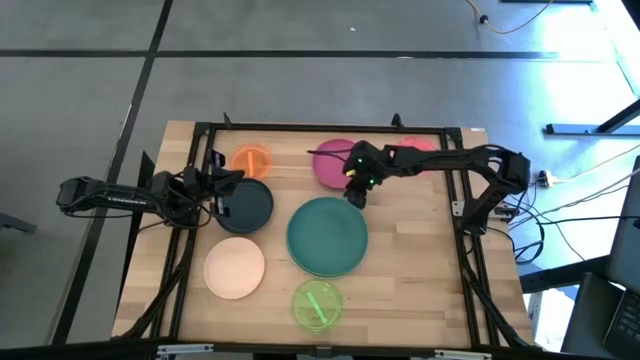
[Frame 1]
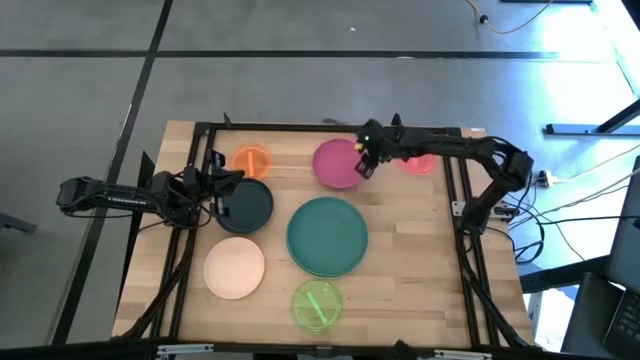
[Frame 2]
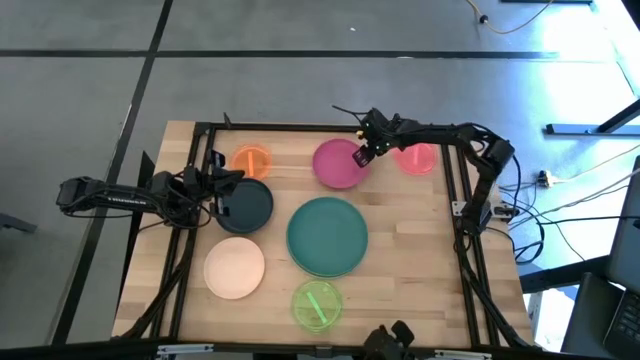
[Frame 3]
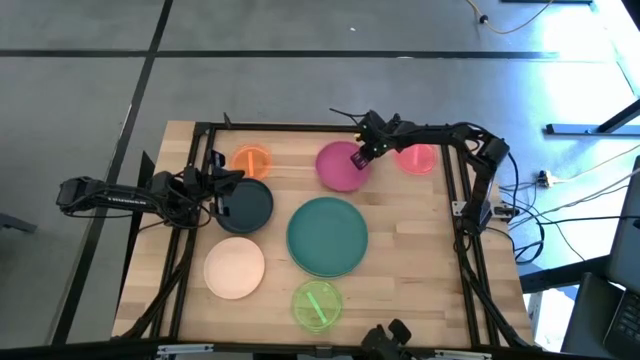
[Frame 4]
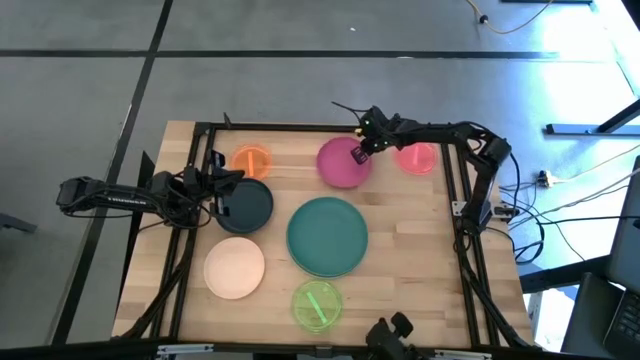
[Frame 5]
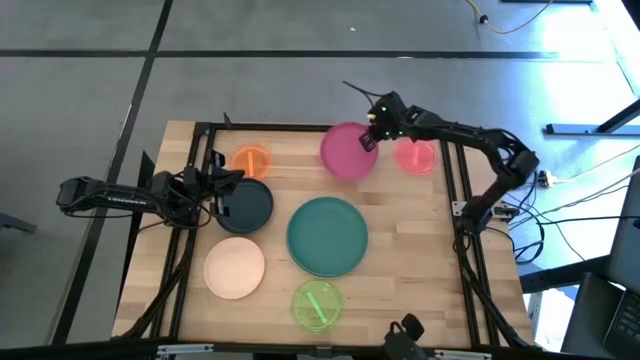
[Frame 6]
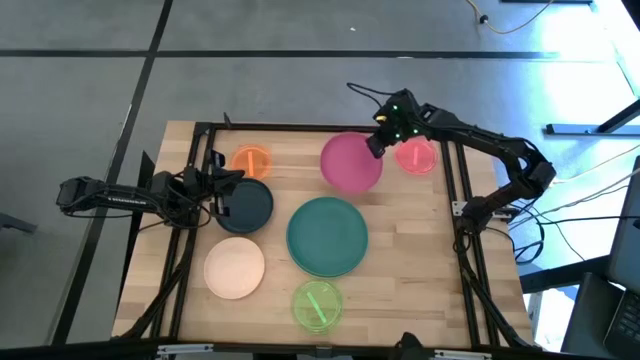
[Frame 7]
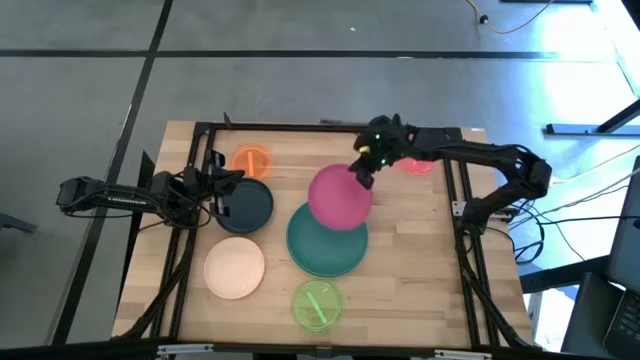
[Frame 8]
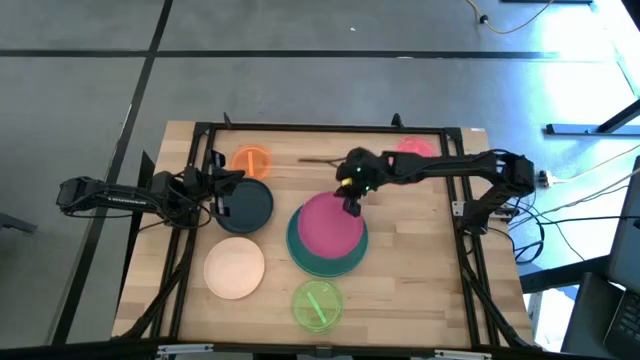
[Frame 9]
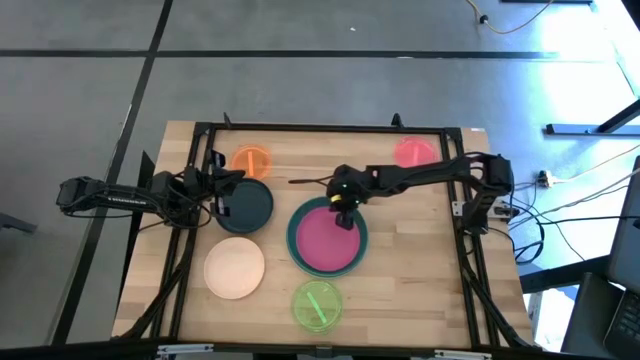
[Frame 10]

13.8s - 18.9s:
Task: Stack plastic plates
Stack the pink plate on the dark green plate

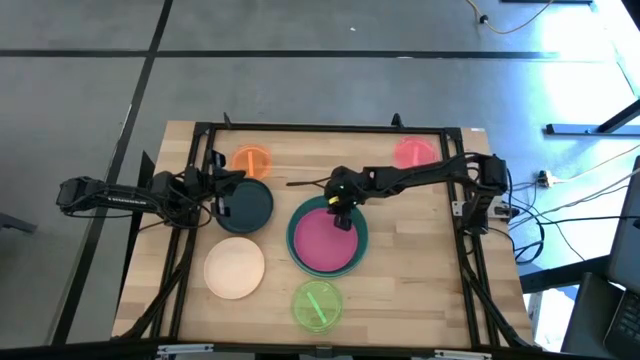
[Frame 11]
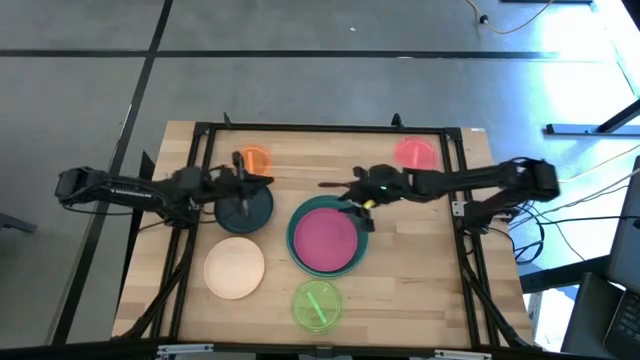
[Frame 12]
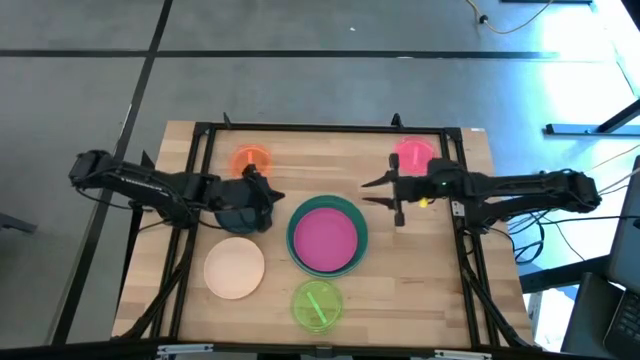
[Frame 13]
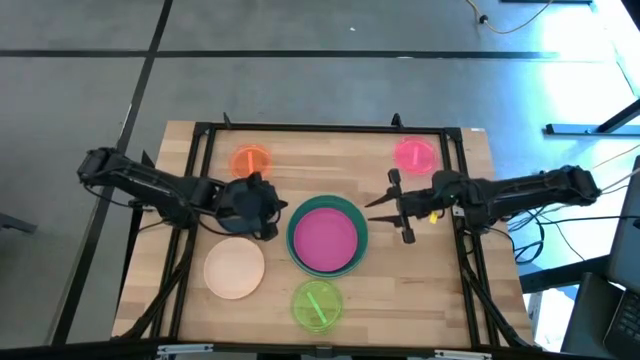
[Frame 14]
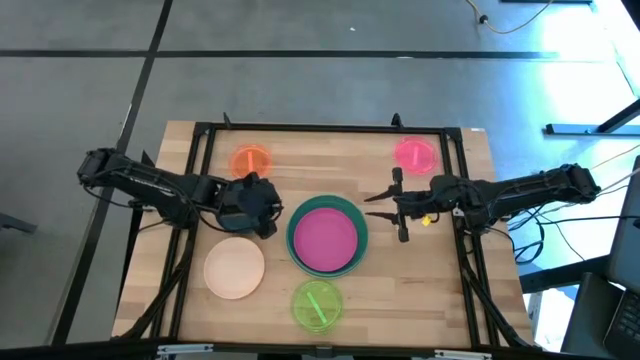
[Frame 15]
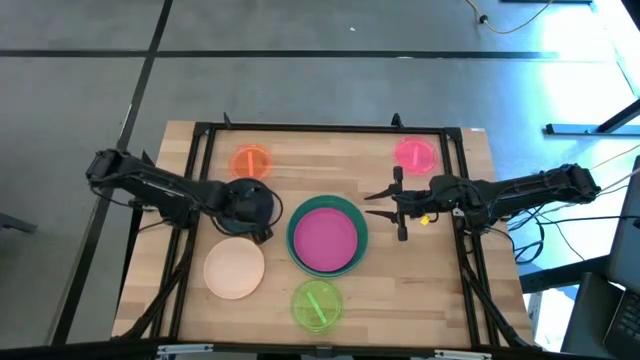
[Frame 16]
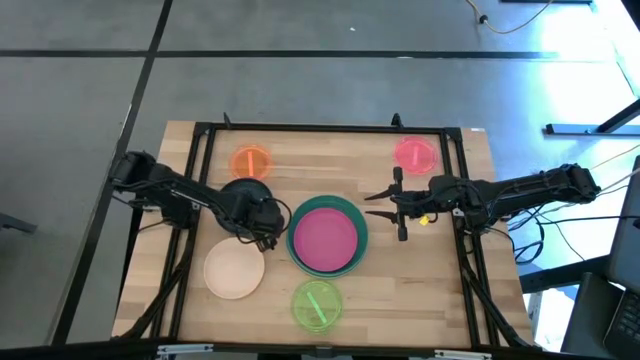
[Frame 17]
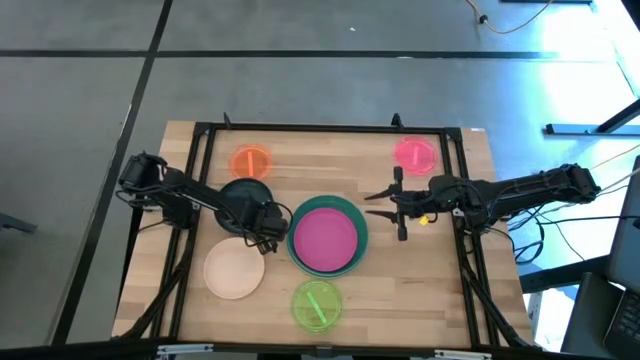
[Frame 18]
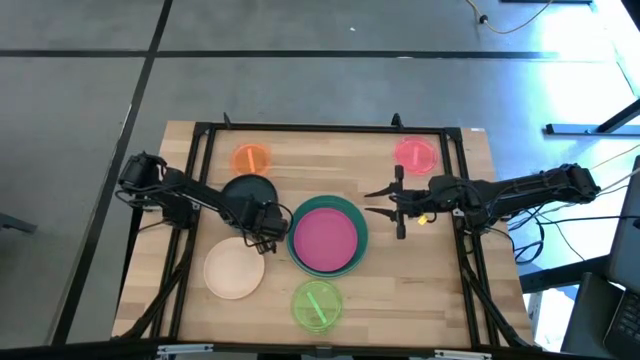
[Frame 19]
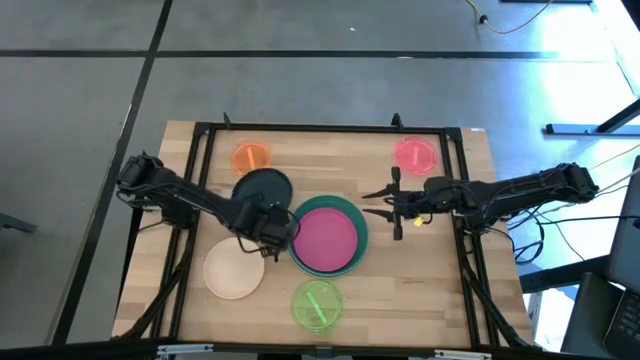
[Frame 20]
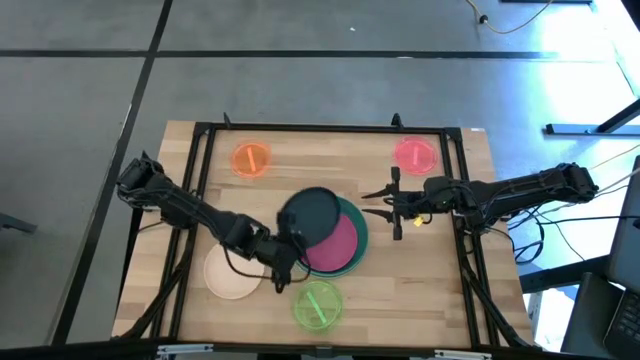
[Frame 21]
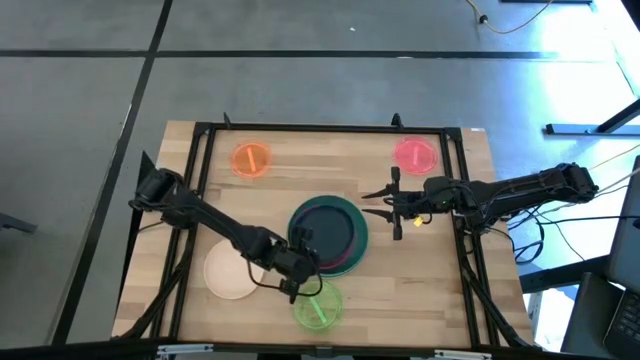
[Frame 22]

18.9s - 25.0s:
Stack the dark blue plate on the pink plate

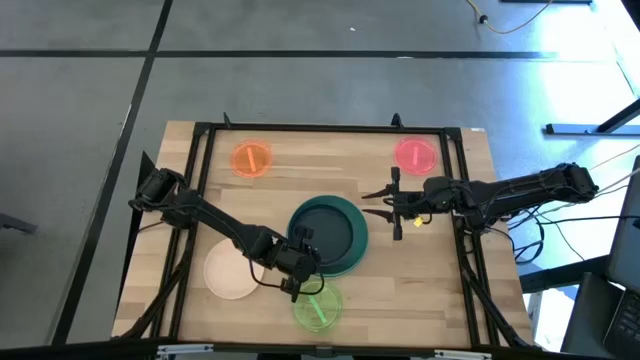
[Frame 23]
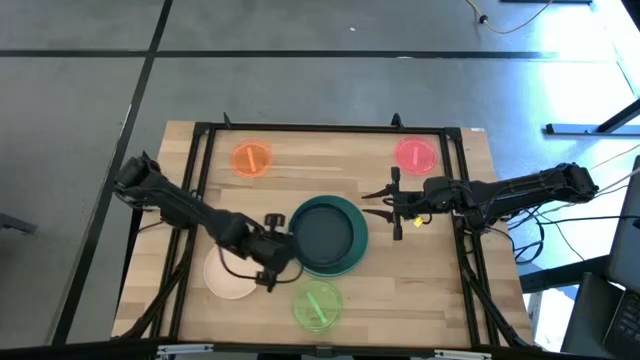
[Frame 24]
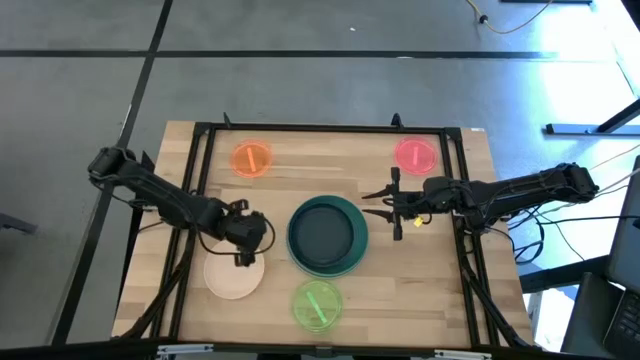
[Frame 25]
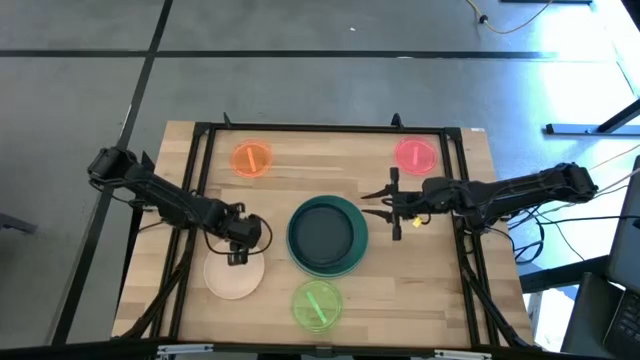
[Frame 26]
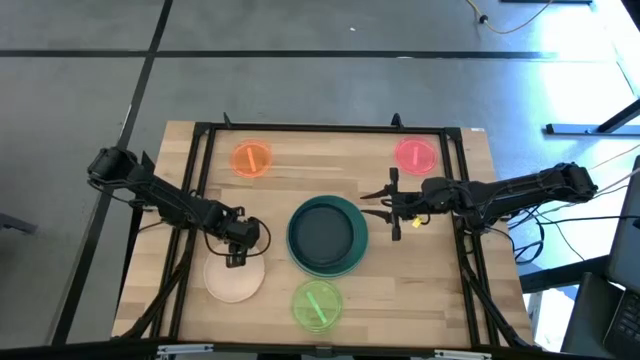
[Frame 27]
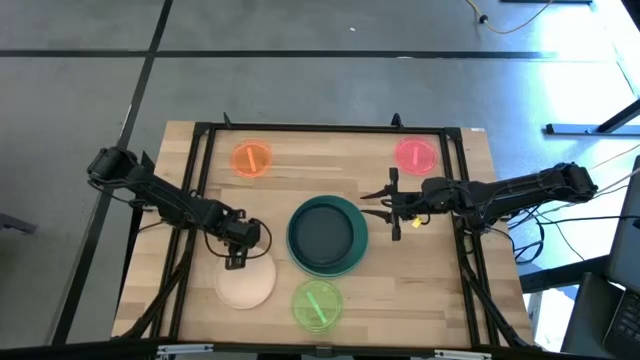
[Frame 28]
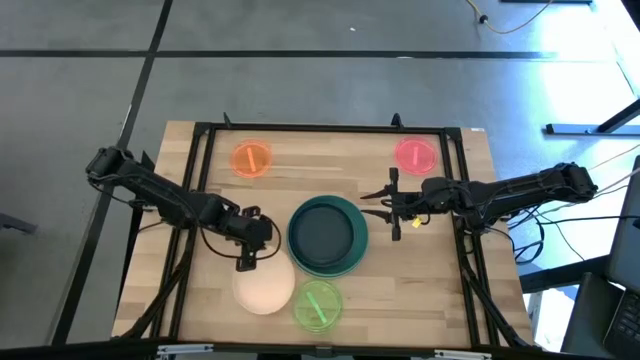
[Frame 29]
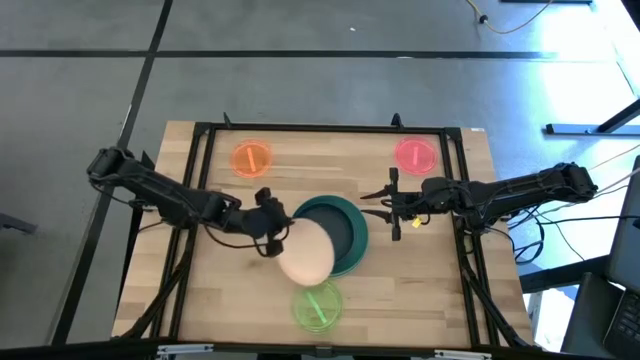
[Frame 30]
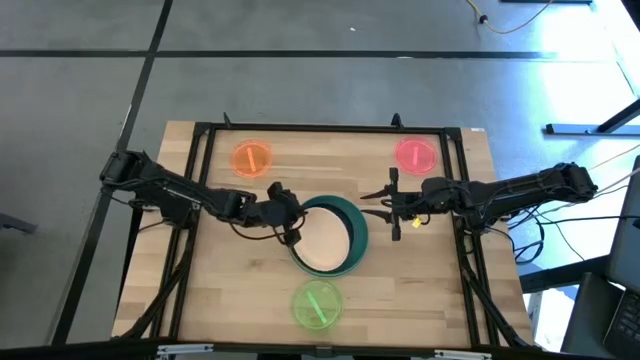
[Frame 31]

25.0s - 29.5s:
Stack the pink plate on the dark blue plate

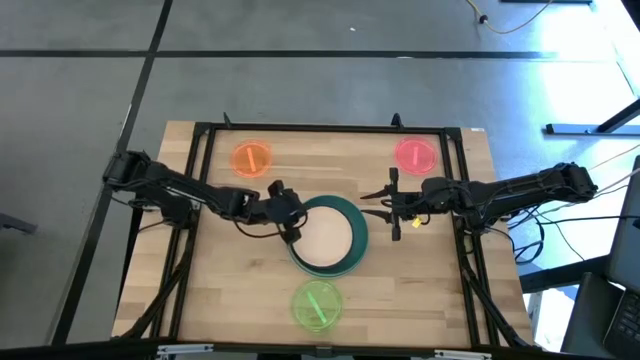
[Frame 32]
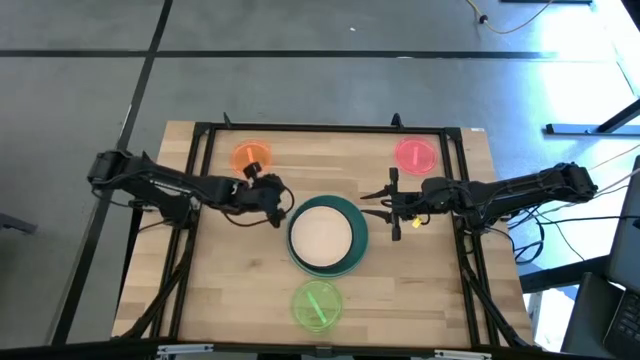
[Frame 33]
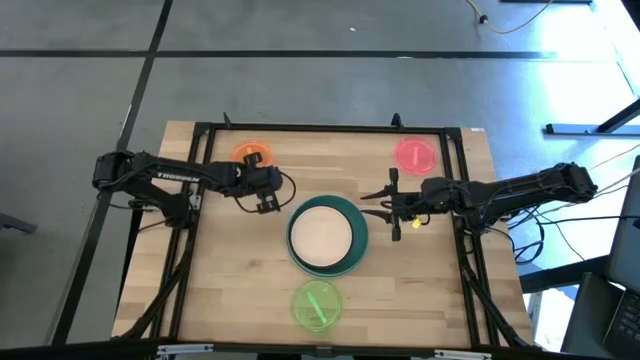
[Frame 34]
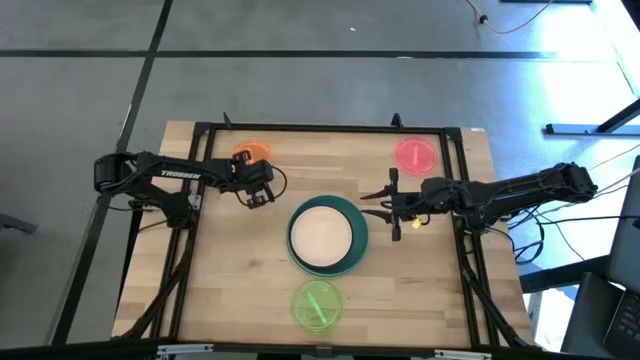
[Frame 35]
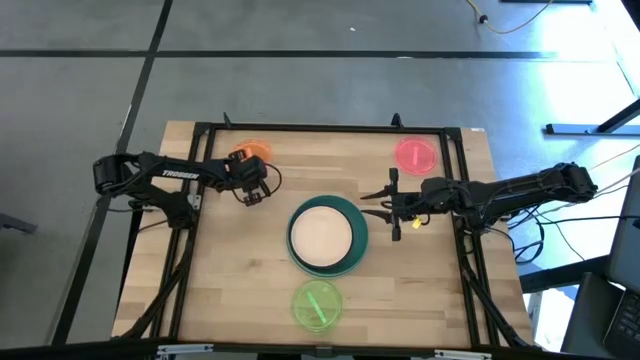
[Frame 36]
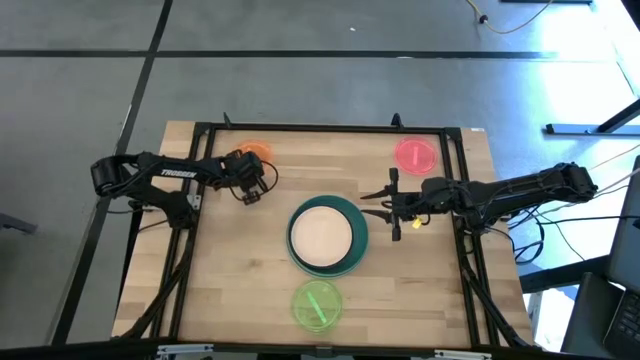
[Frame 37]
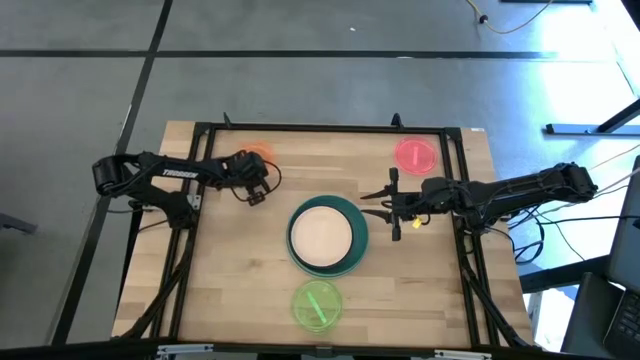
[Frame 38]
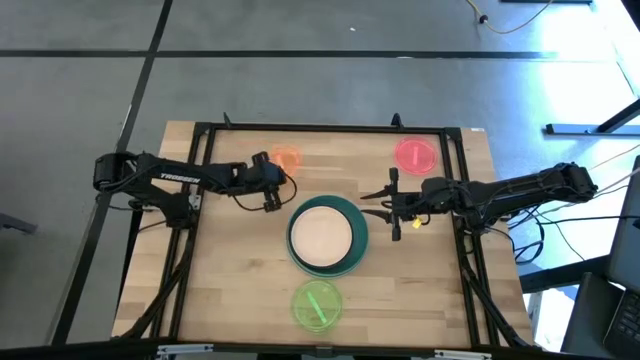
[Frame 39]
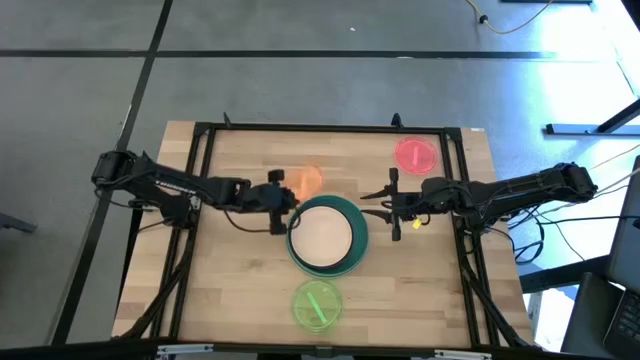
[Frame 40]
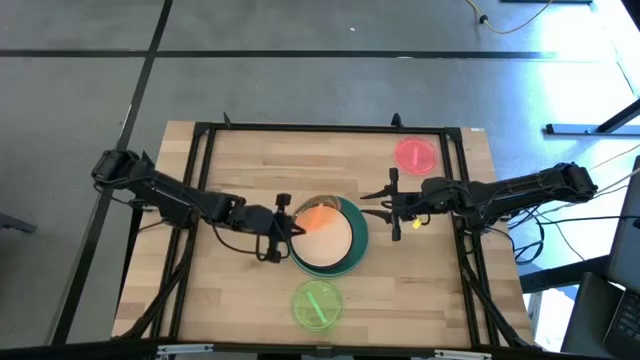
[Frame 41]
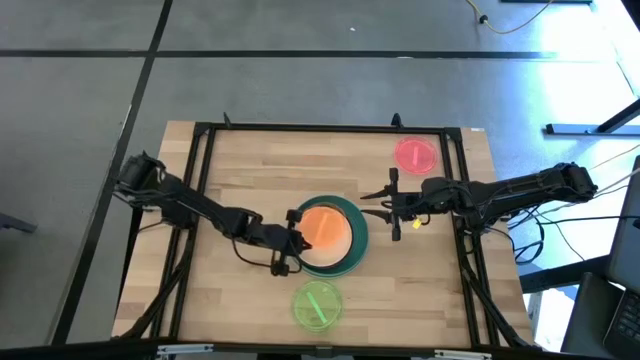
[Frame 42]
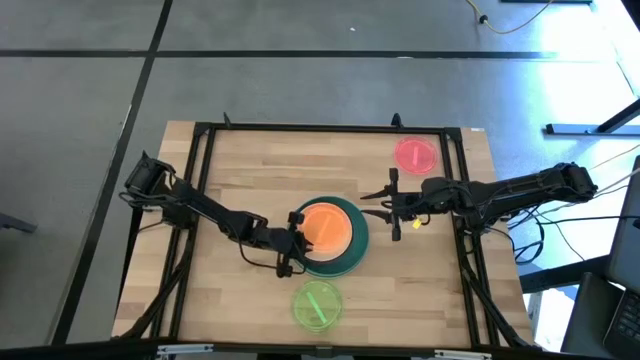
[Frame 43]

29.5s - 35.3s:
Stack the orange plate on the pink plate
